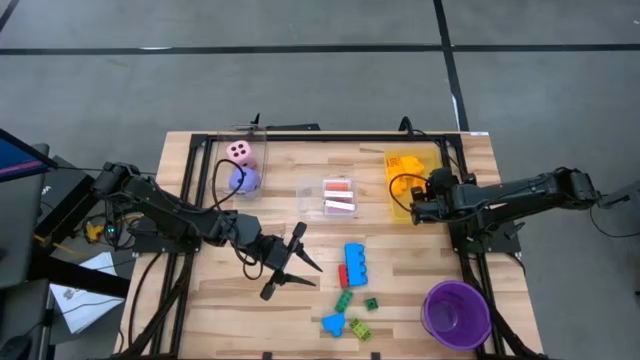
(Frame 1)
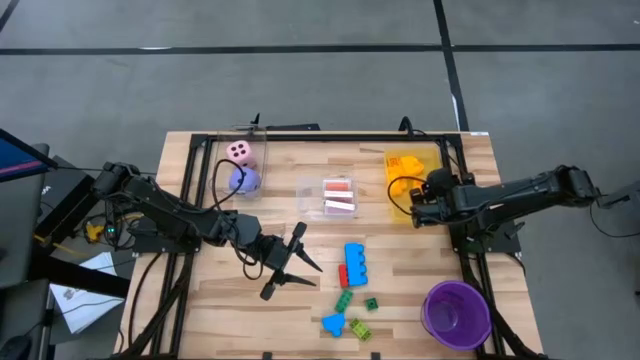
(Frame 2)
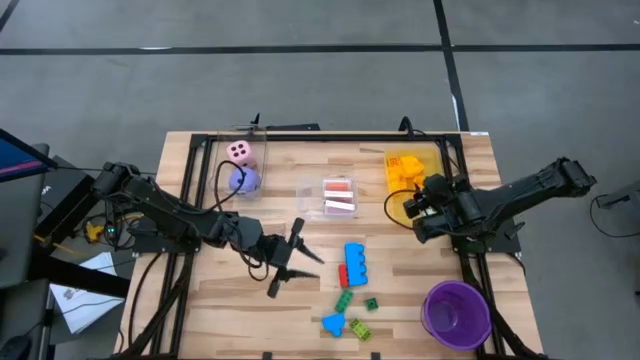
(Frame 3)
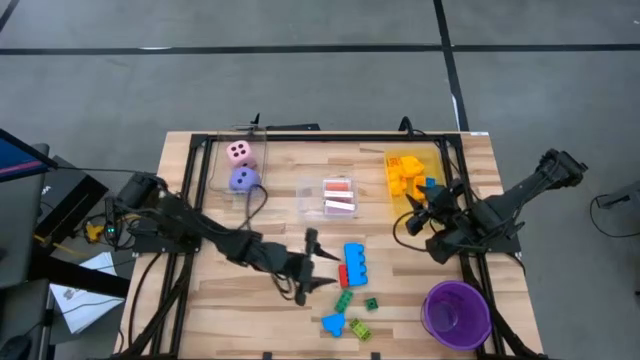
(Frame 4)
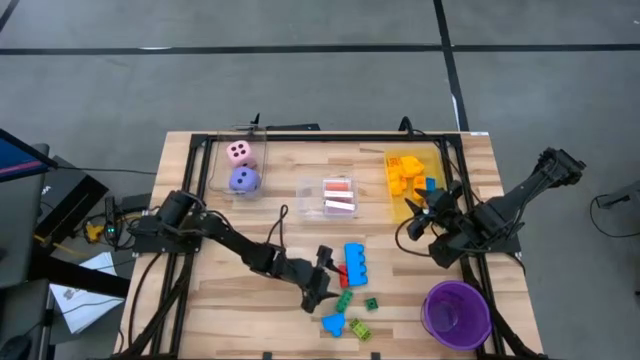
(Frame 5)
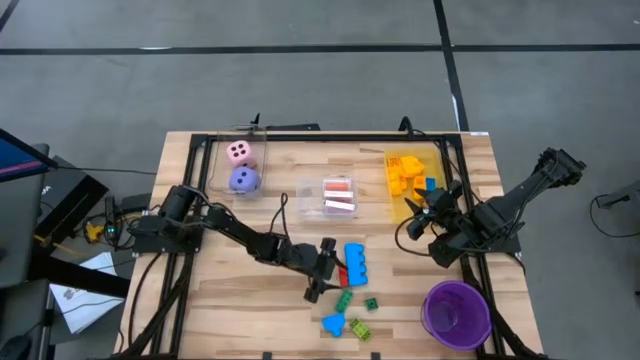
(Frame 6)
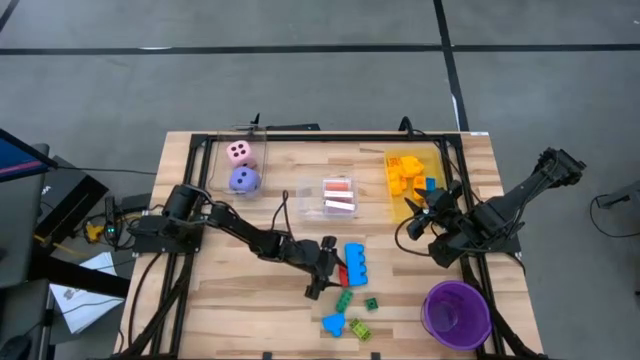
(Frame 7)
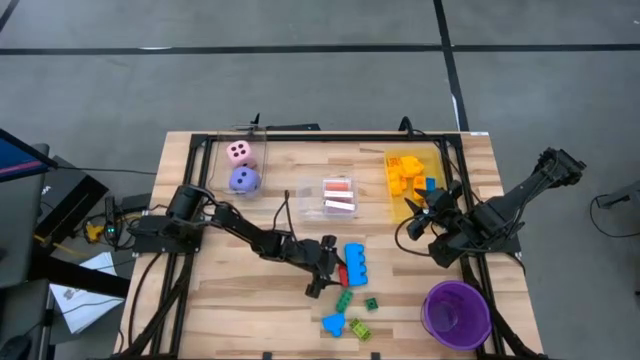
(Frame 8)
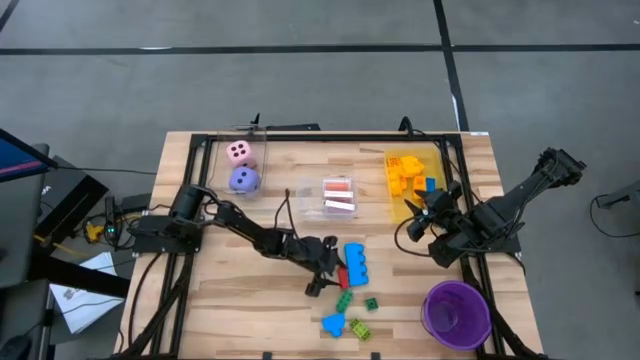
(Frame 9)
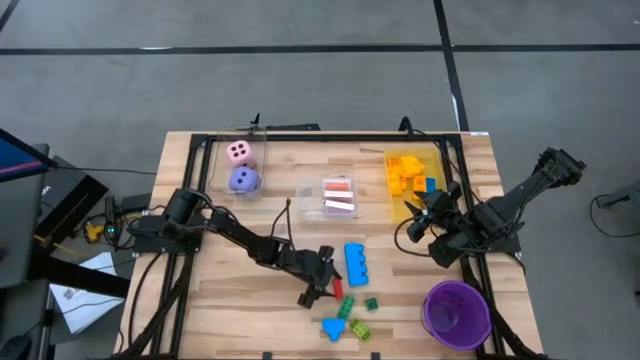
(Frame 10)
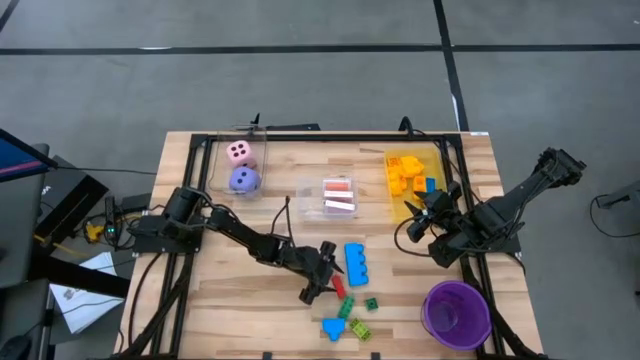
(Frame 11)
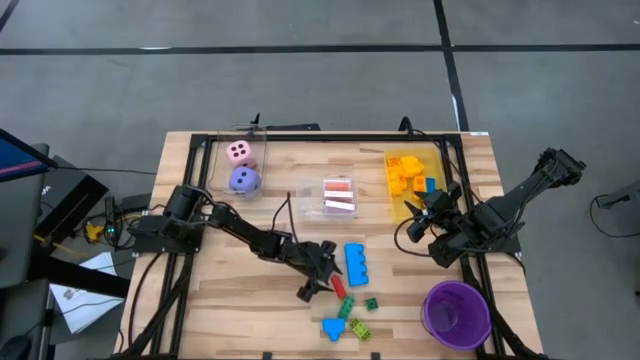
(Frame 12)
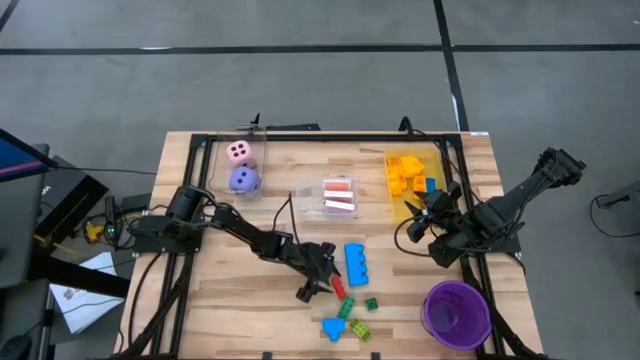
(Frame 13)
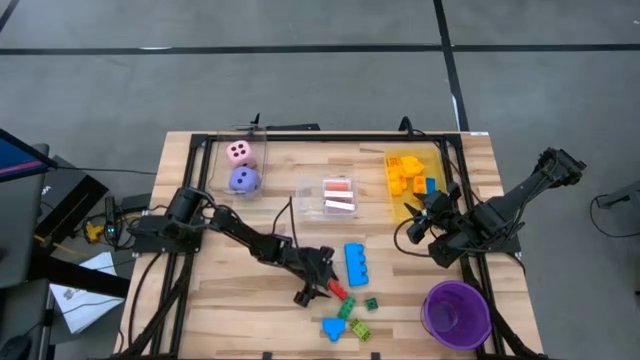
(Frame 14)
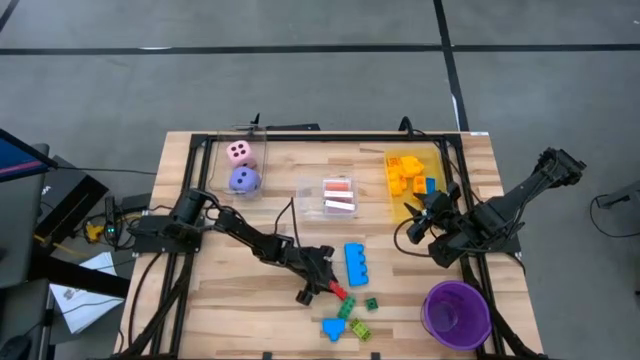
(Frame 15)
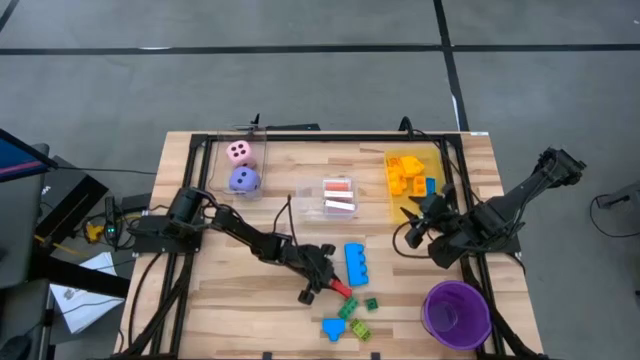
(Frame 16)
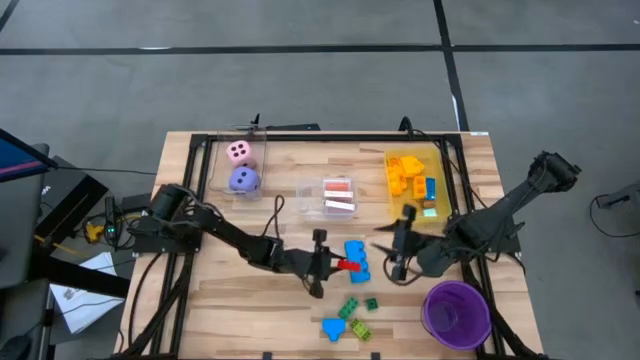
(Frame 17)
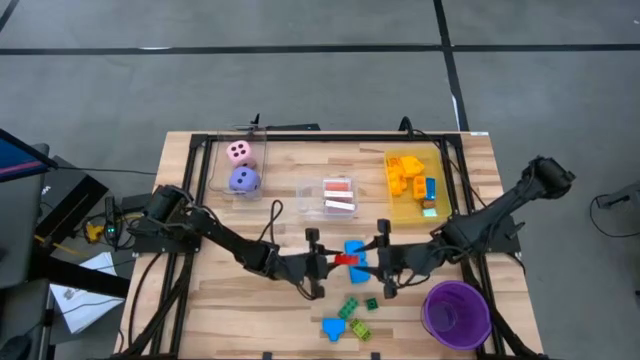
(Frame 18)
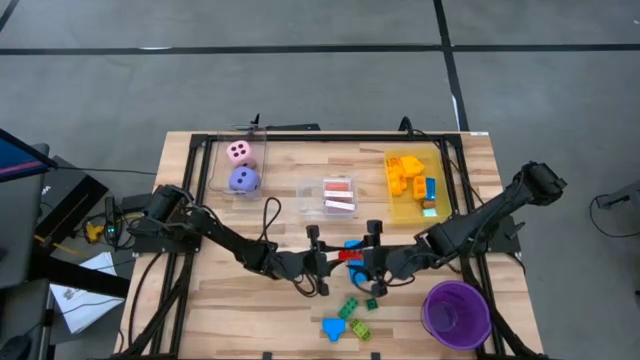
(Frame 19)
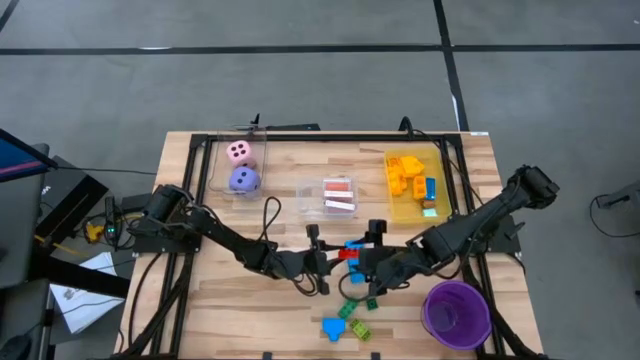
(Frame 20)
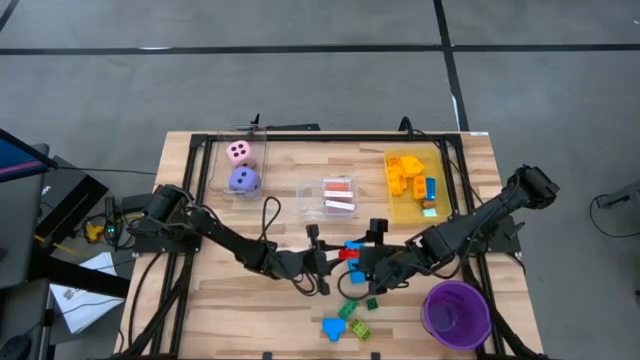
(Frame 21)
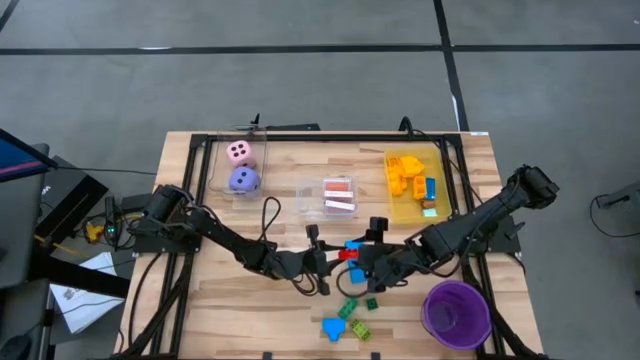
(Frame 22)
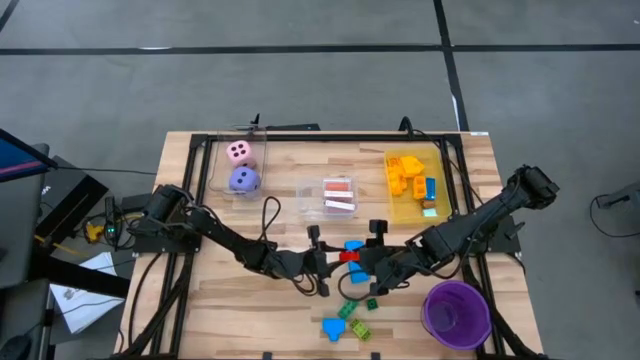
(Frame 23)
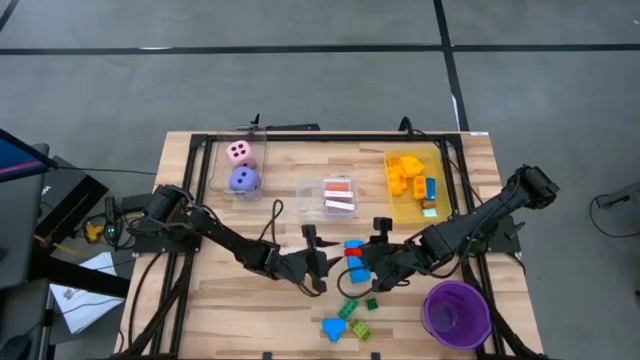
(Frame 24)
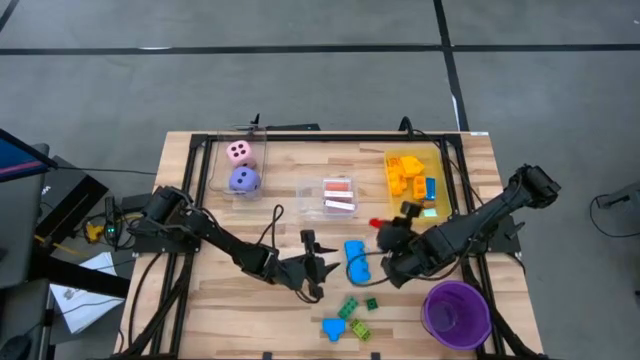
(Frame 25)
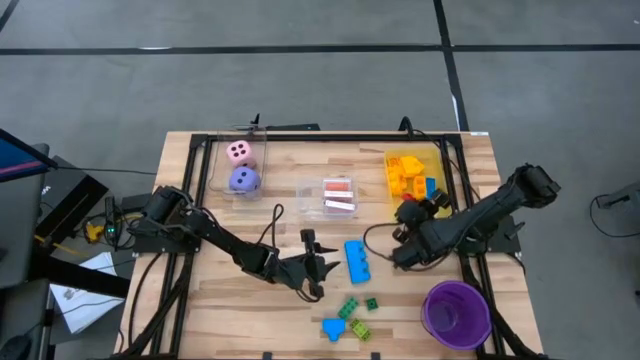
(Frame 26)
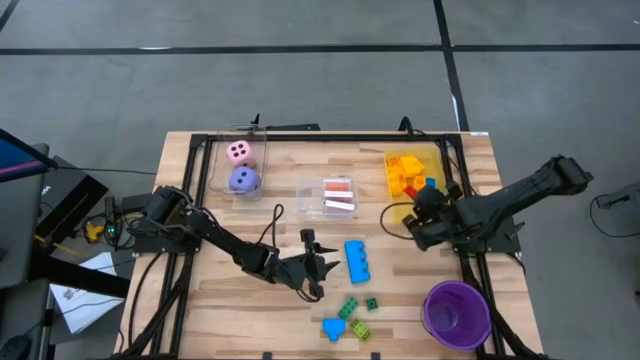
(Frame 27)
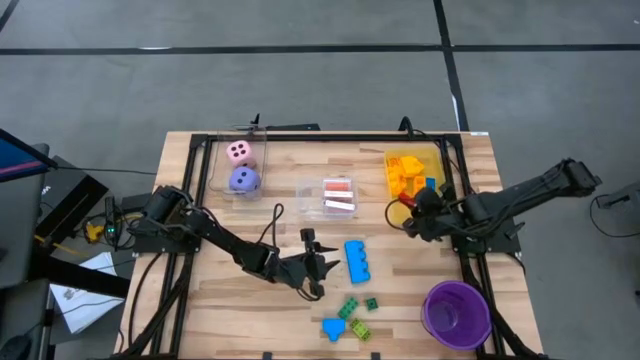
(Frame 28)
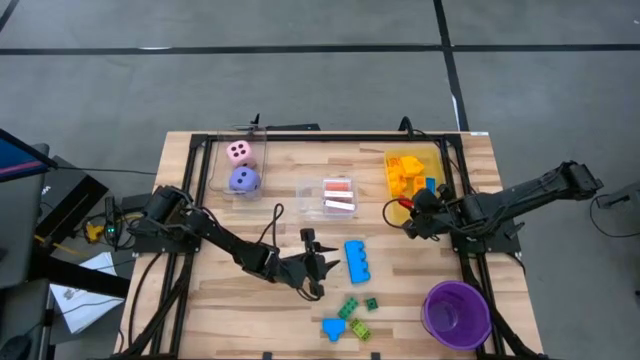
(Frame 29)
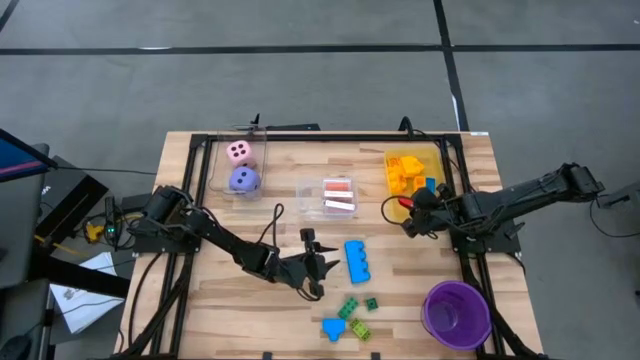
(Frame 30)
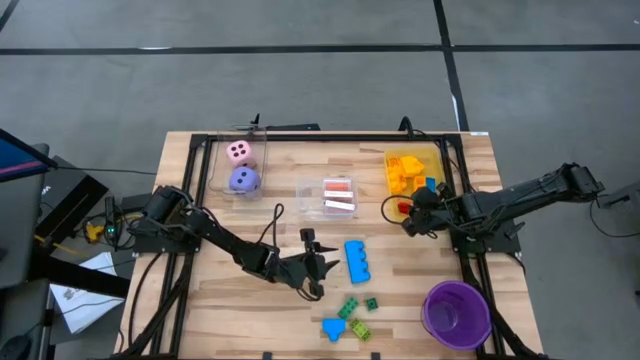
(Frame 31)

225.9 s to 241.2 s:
Task: Pick & Place Toys
Put the red game piece into the yellow bin

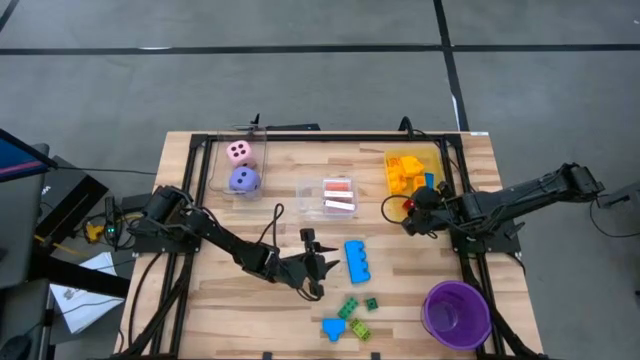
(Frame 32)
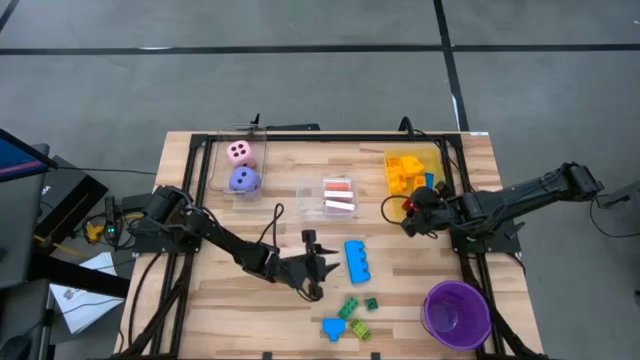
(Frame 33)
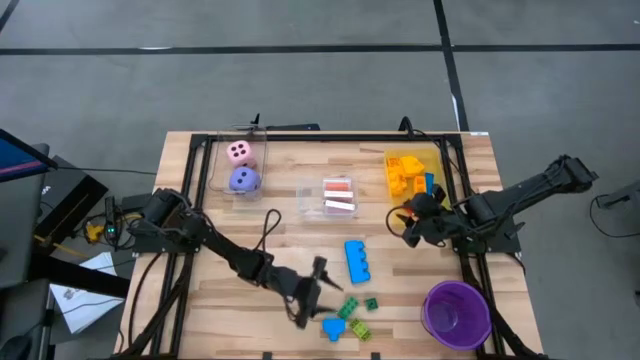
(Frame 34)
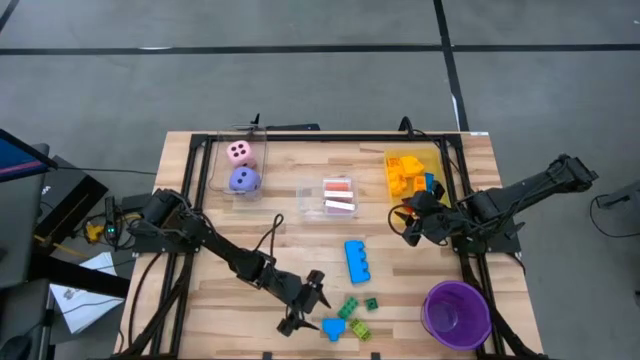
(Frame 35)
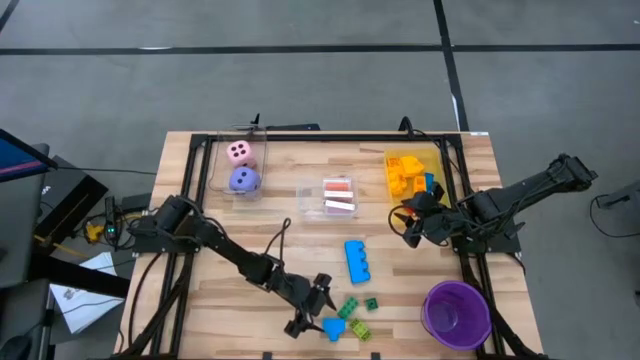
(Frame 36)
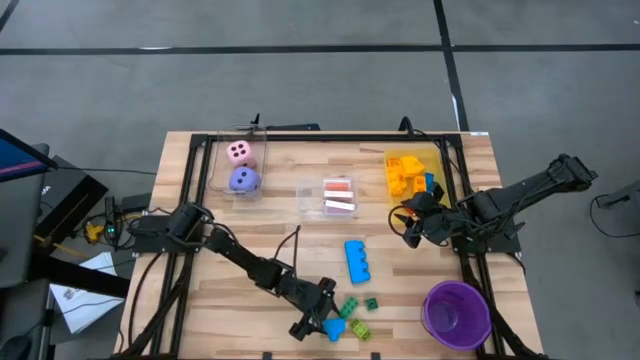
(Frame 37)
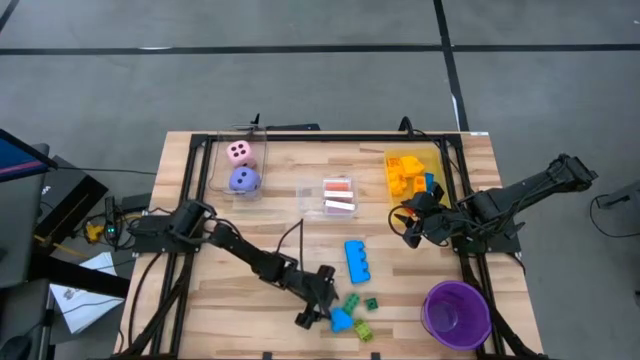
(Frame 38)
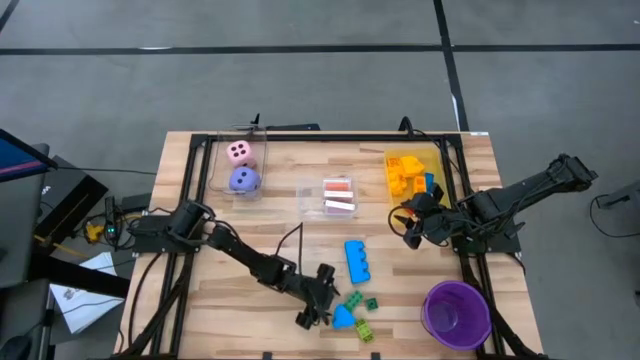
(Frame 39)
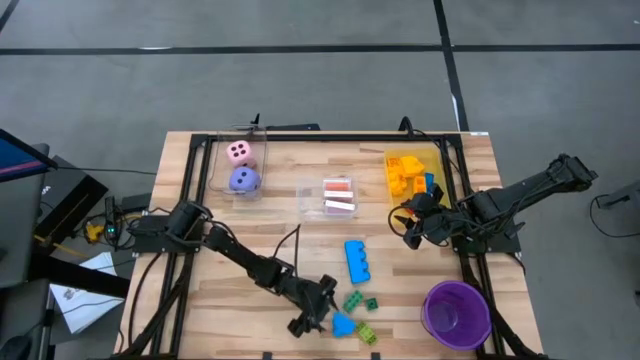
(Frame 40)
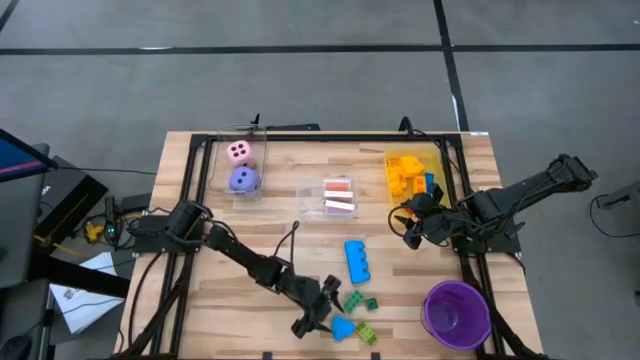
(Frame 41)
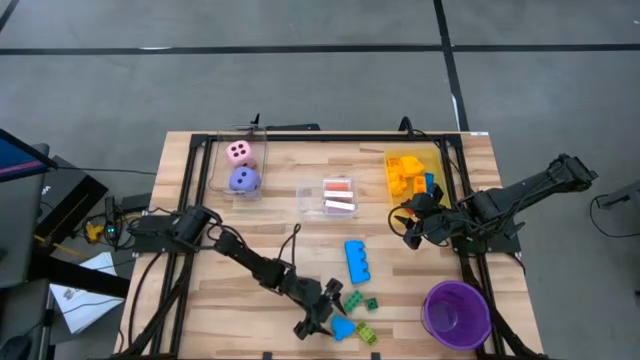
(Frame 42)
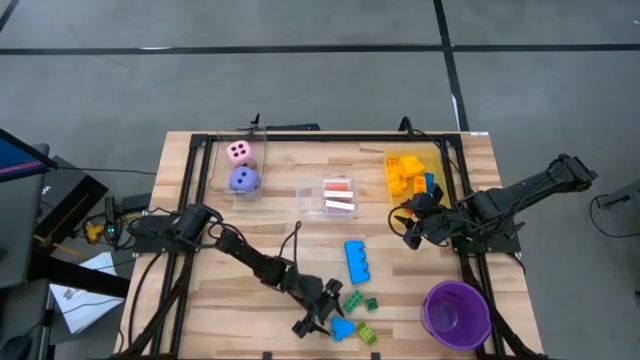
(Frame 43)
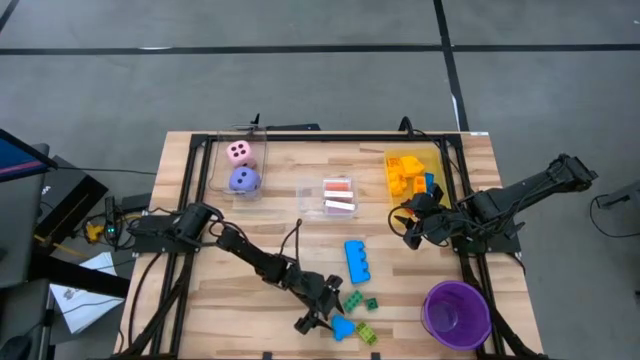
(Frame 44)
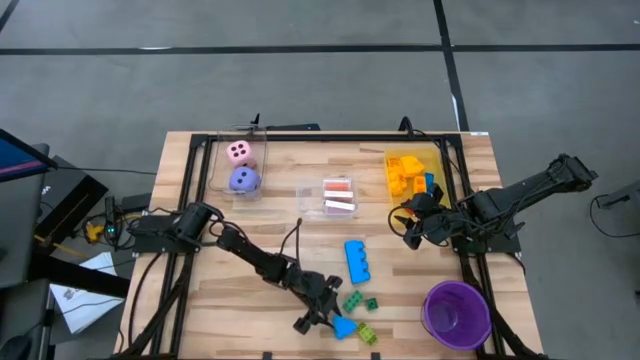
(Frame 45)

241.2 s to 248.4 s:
Put the blue game piece into the yellow bin
